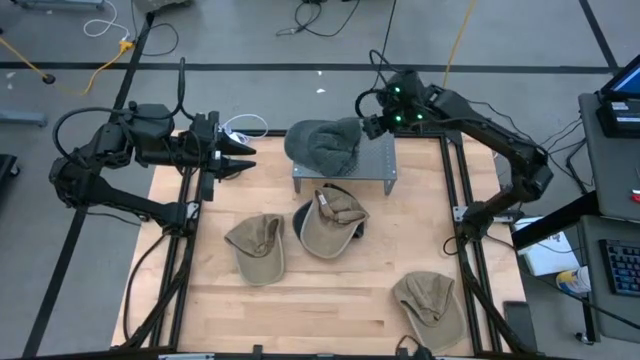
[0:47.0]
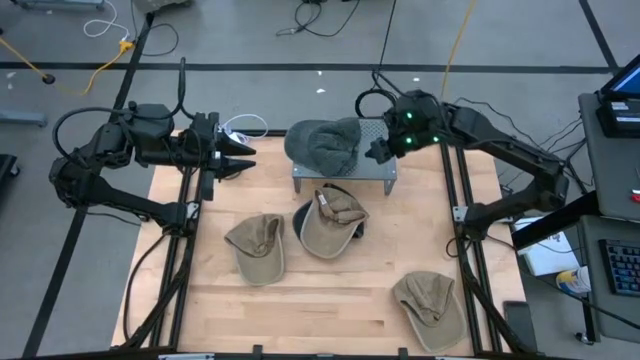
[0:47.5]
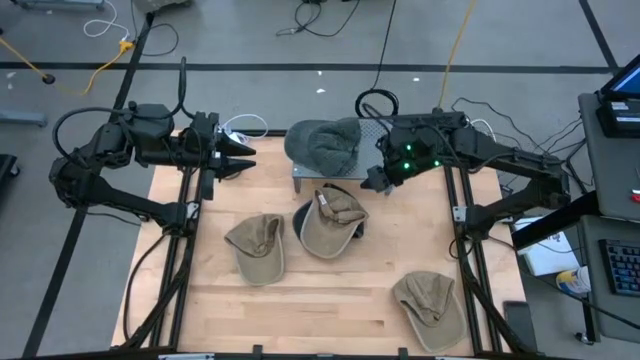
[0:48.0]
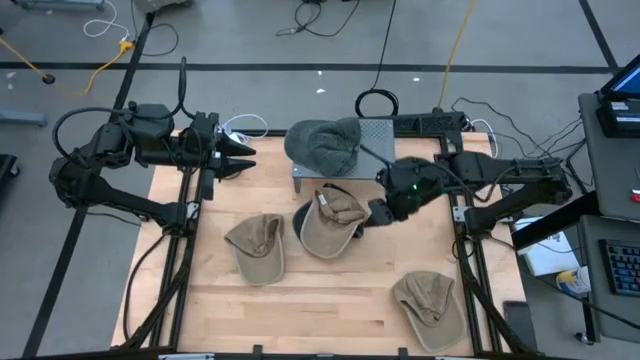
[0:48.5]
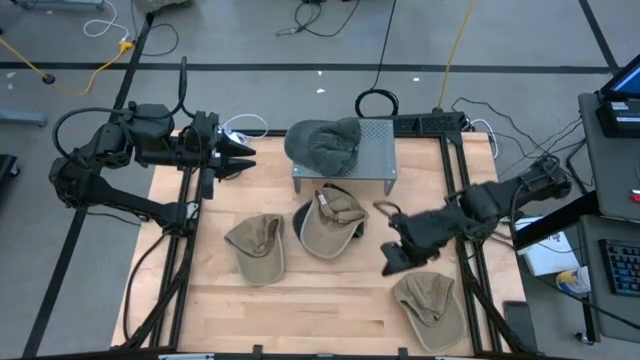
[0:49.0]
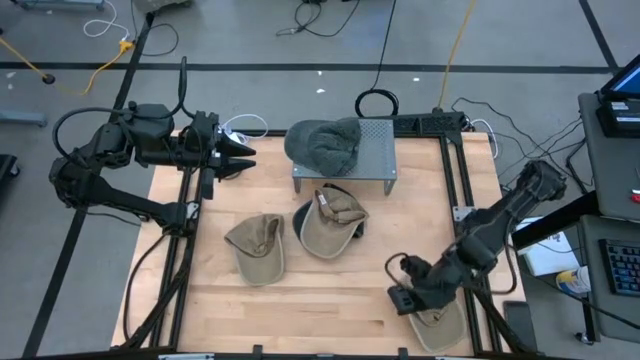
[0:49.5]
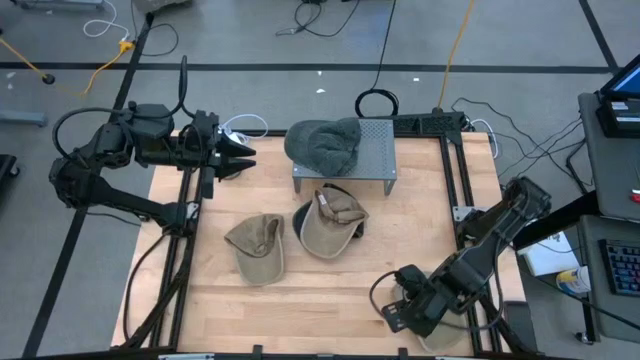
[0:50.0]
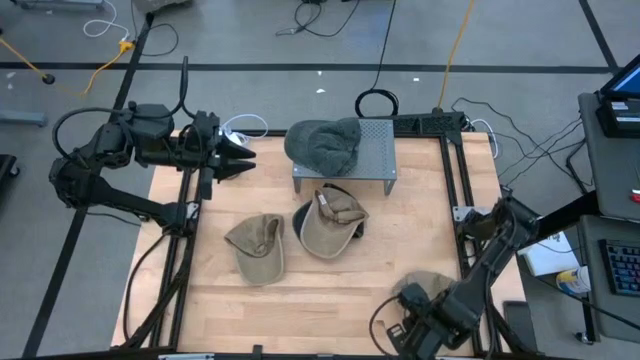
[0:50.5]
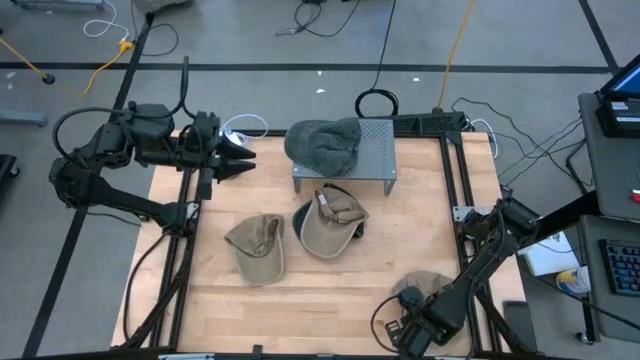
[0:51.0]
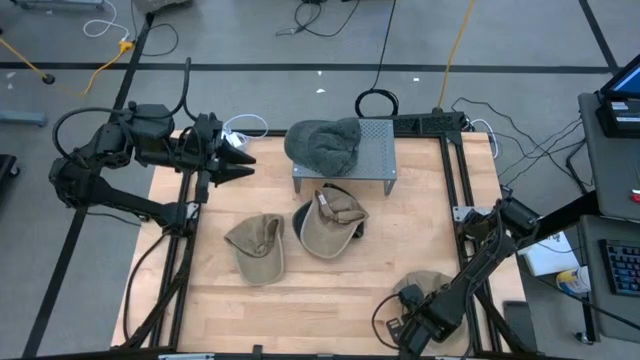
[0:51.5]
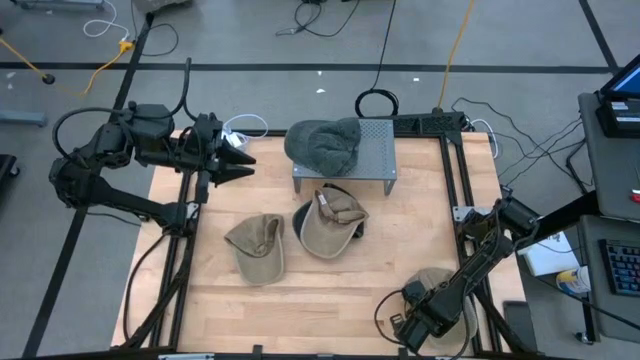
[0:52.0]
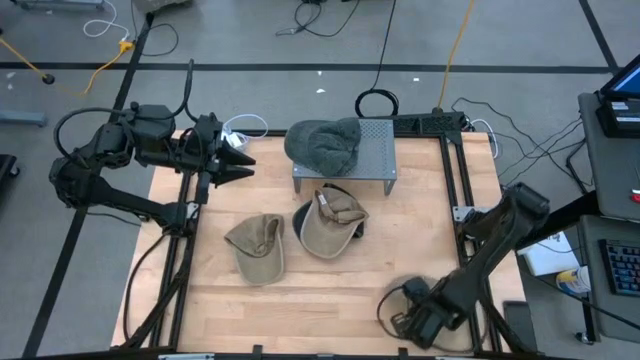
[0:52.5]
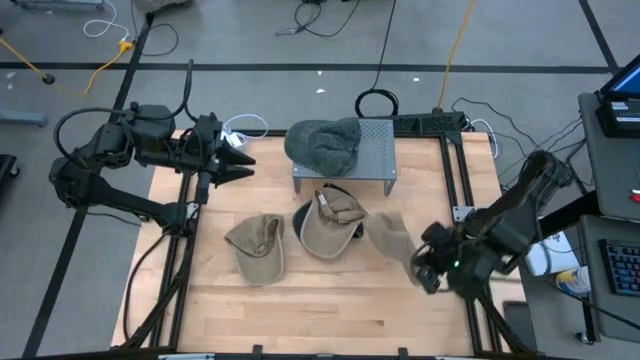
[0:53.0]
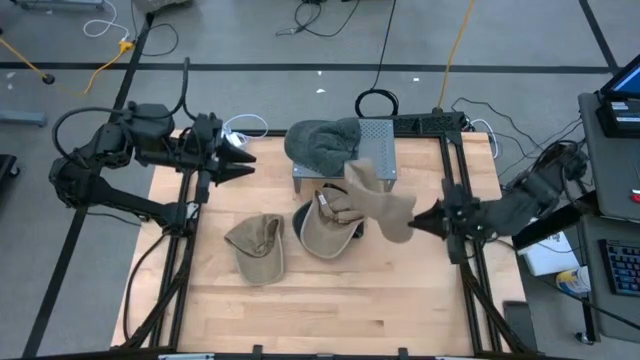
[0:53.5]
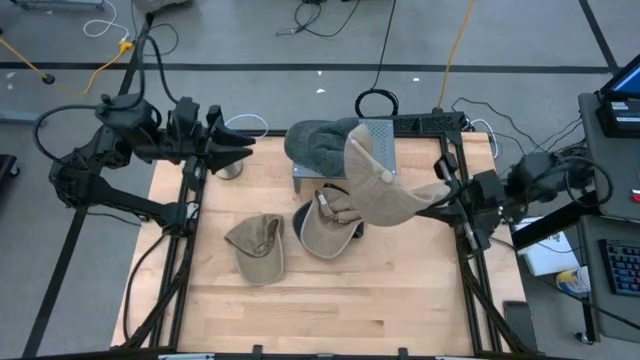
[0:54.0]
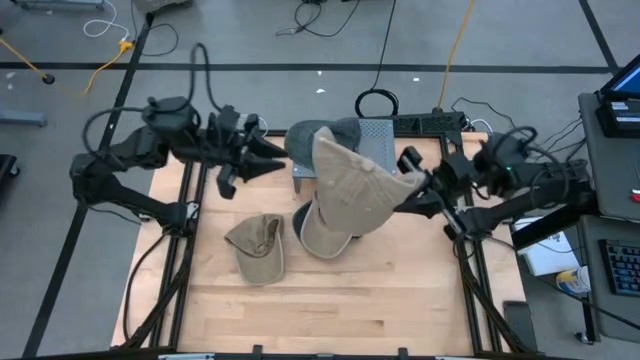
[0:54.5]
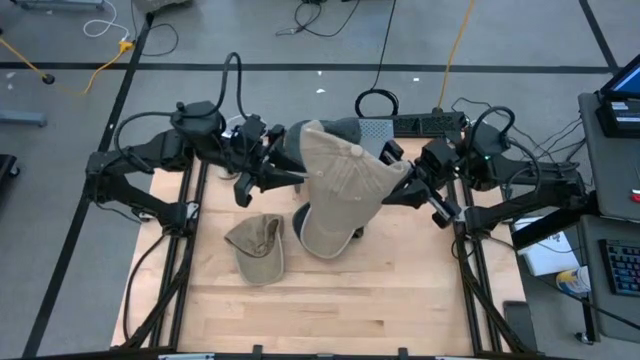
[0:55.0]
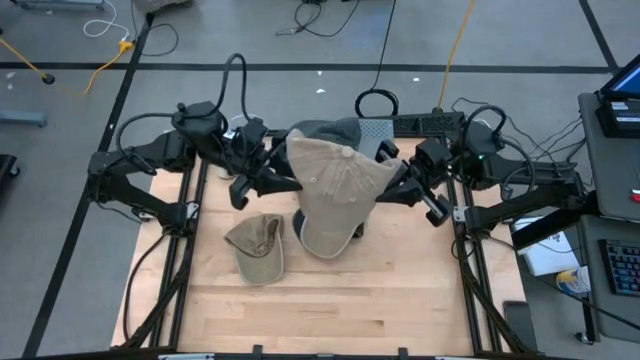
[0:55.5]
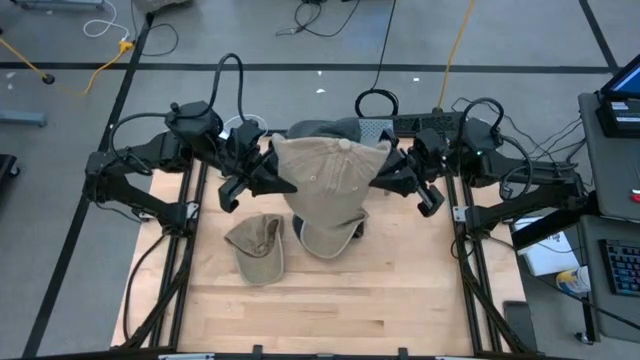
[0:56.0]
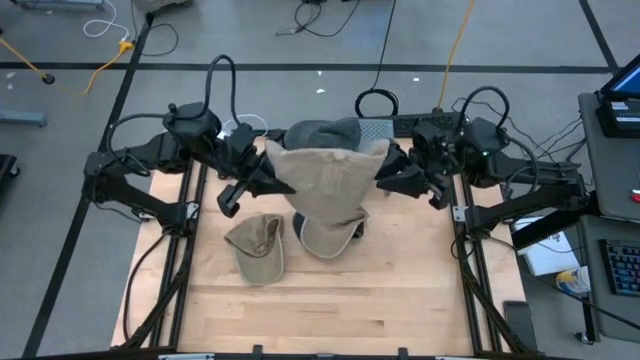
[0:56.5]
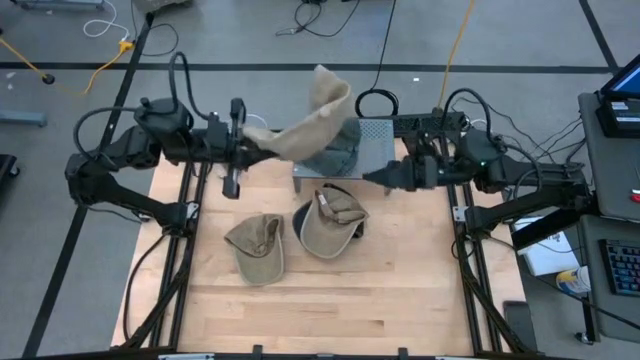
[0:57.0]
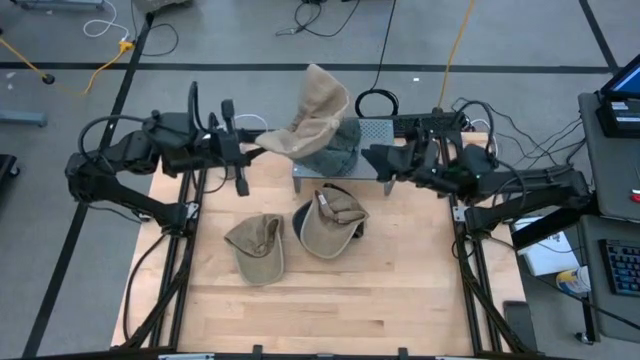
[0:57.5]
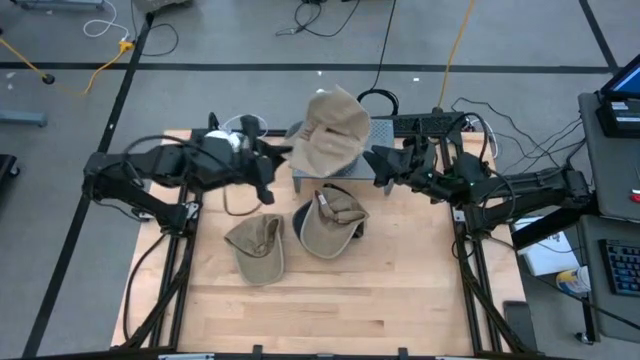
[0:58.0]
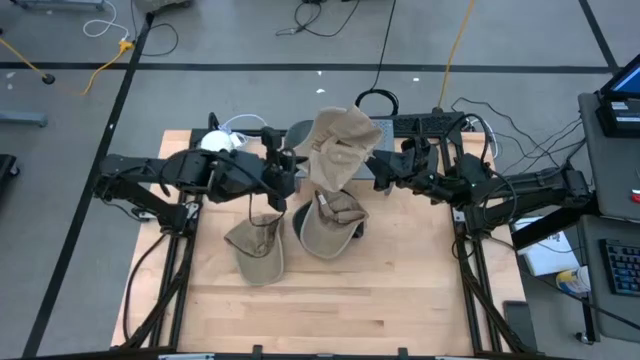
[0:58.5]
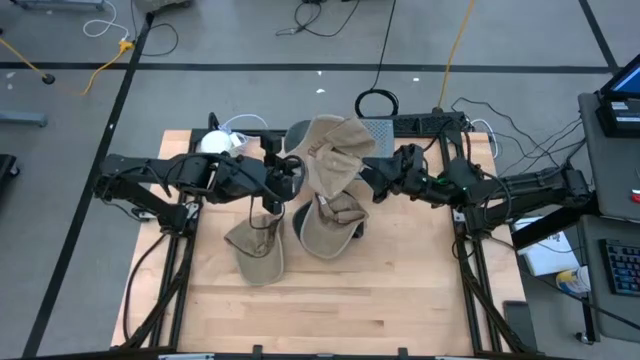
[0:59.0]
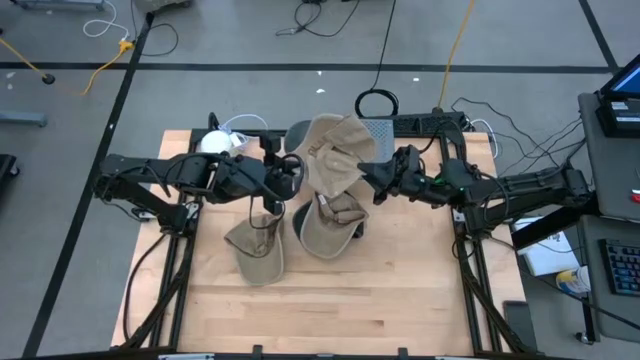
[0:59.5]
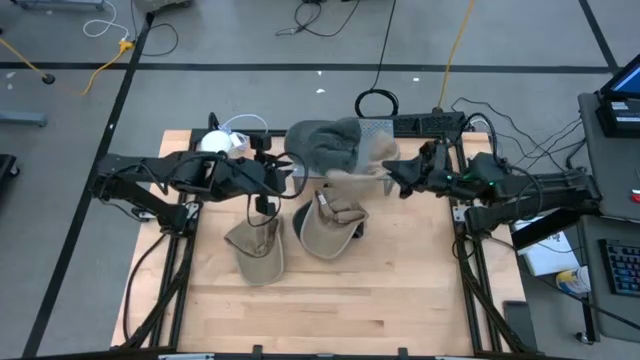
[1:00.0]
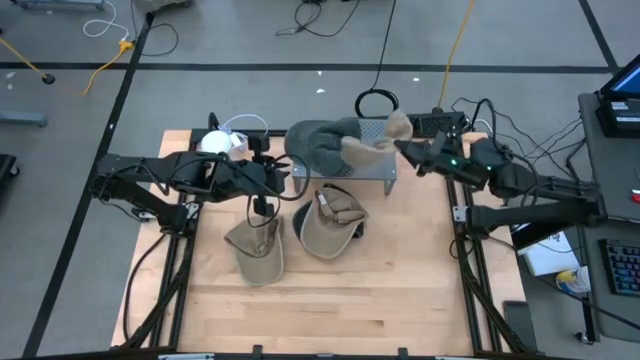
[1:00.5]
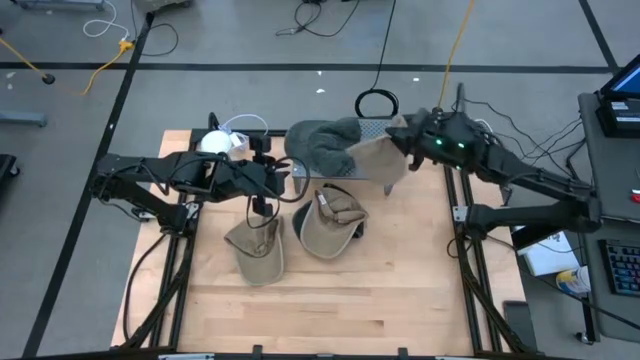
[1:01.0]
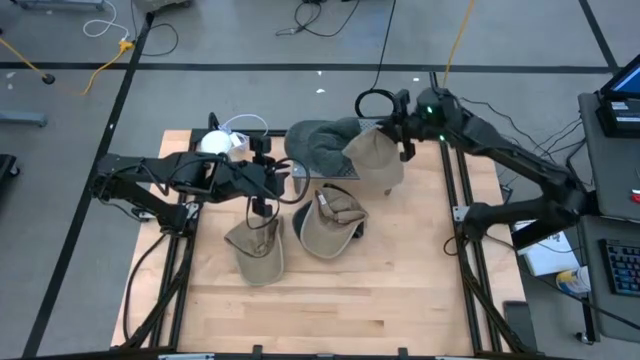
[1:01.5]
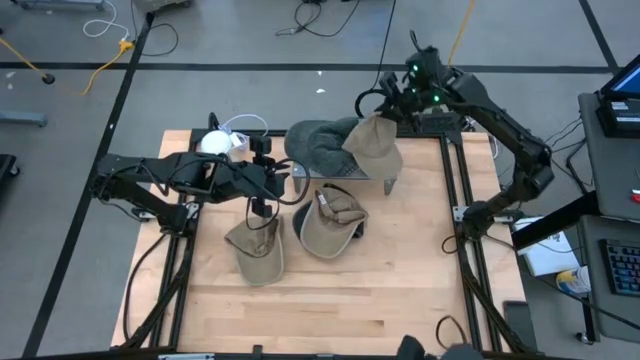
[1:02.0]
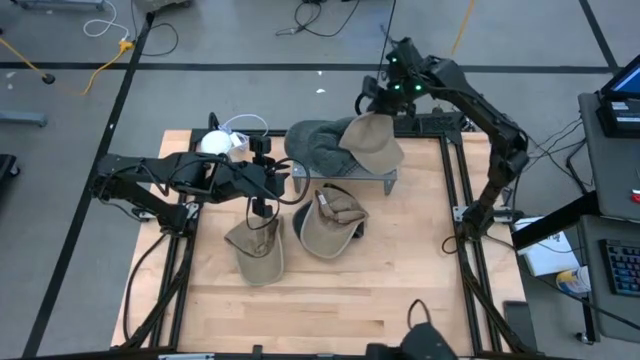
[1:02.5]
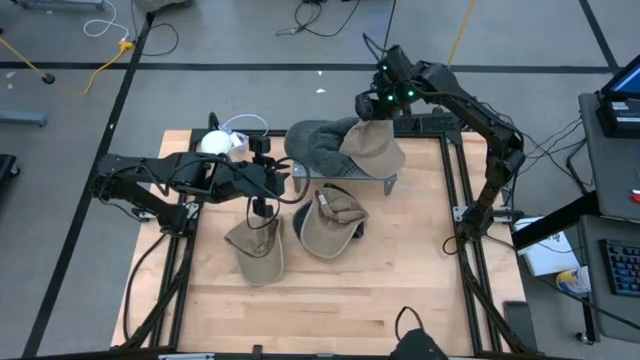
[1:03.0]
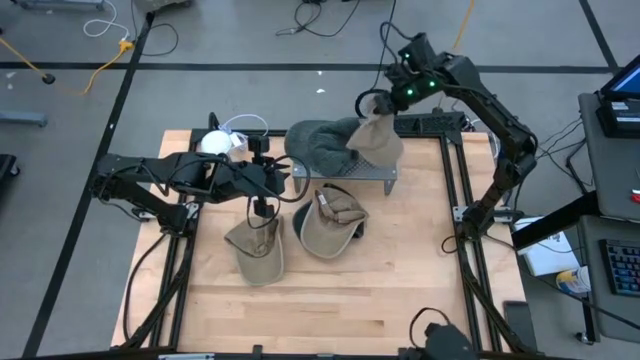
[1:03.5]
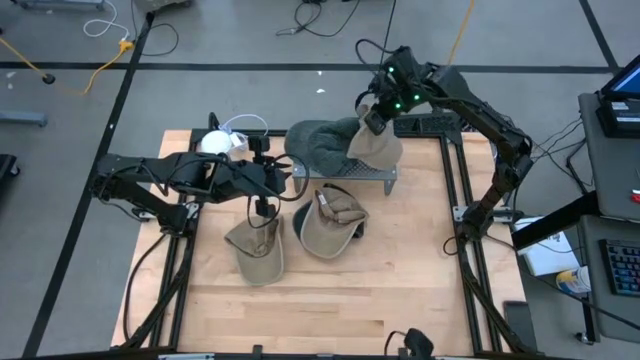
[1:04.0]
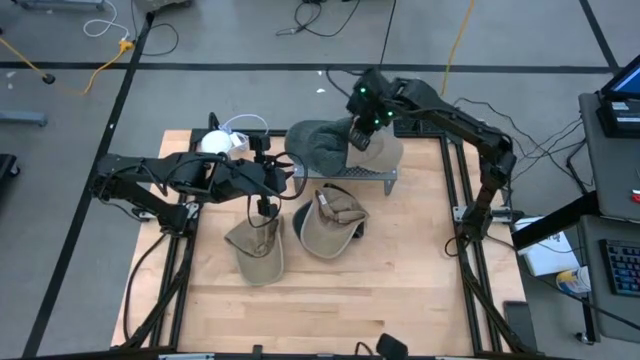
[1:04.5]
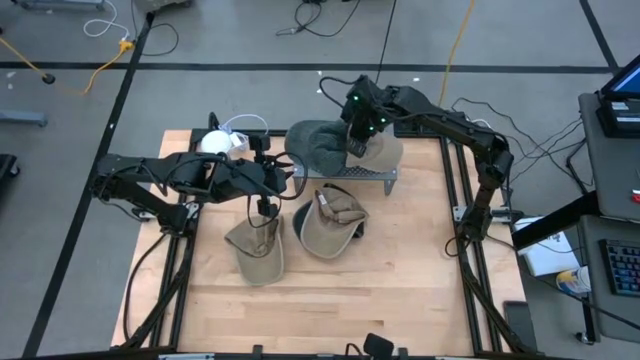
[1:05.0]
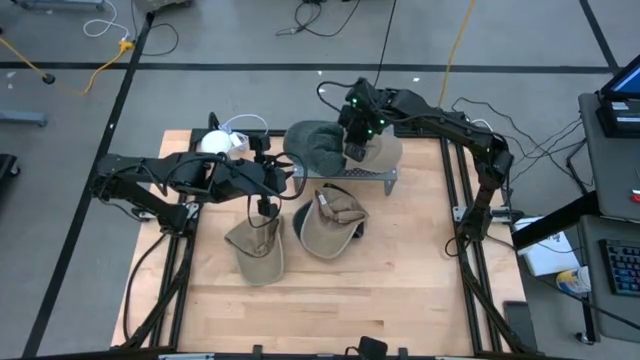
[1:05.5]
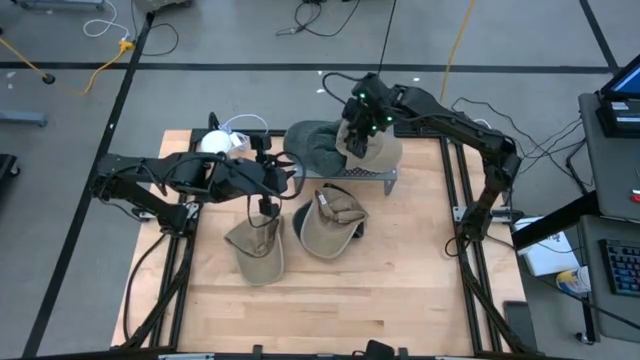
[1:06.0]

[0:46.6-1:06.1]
Task: Pick & Place hat
Put the bottom right brown cap on the shelf
